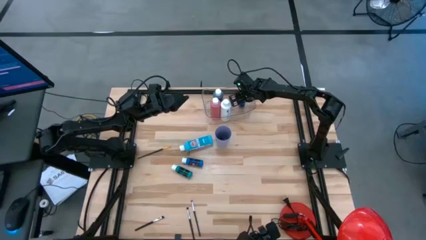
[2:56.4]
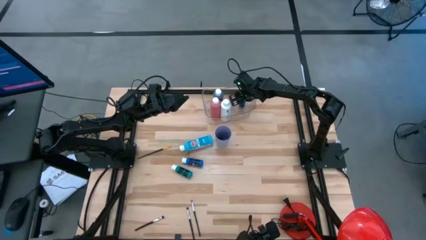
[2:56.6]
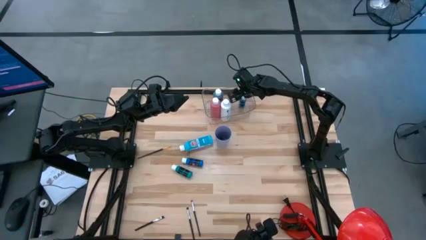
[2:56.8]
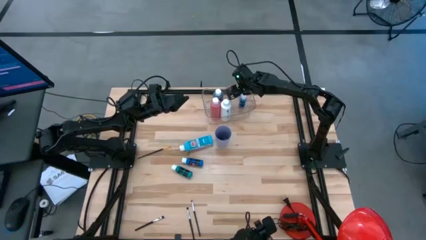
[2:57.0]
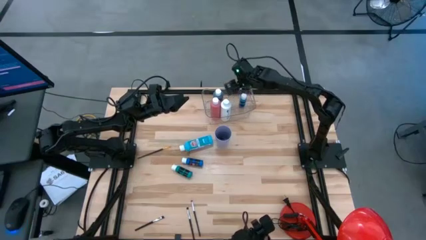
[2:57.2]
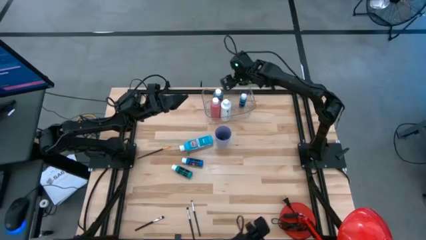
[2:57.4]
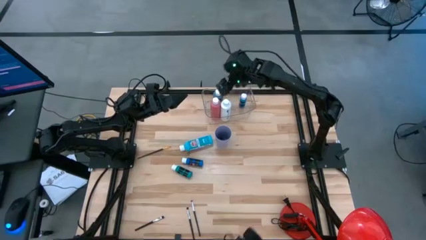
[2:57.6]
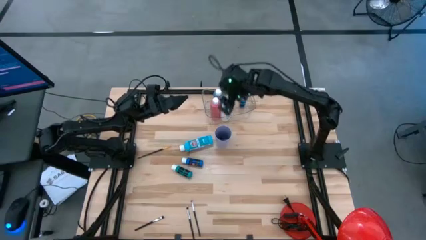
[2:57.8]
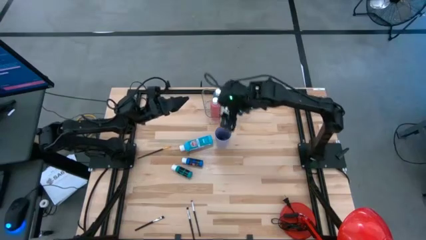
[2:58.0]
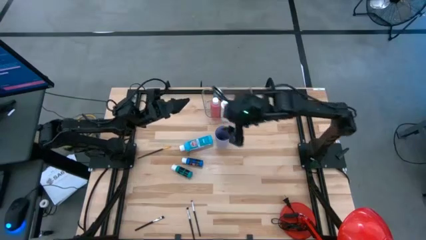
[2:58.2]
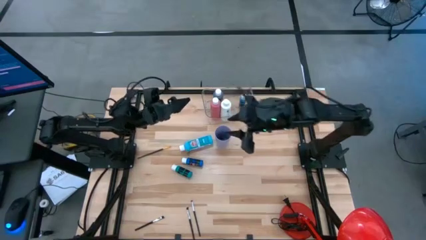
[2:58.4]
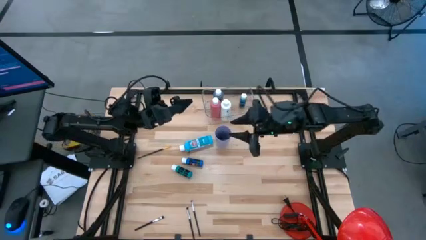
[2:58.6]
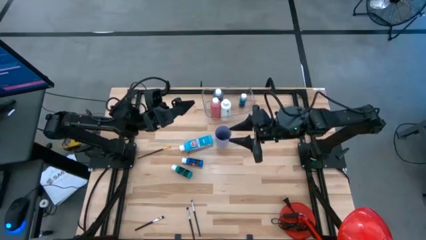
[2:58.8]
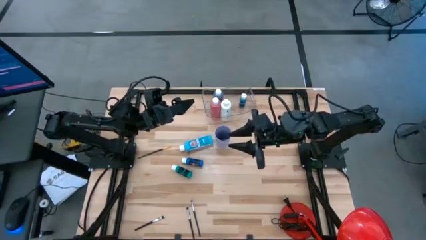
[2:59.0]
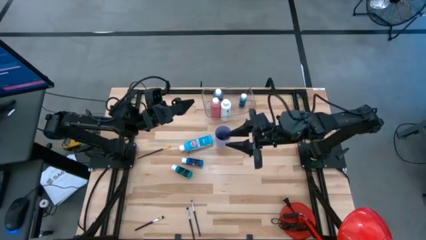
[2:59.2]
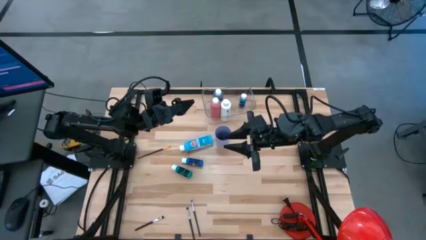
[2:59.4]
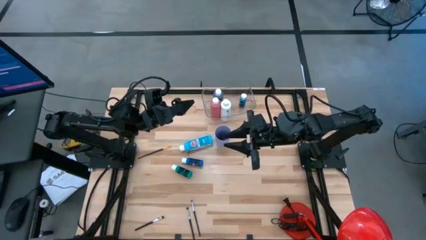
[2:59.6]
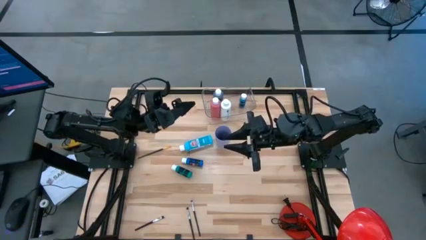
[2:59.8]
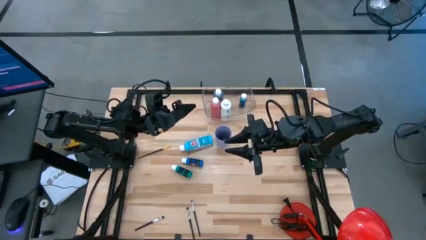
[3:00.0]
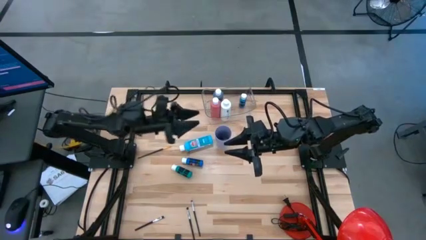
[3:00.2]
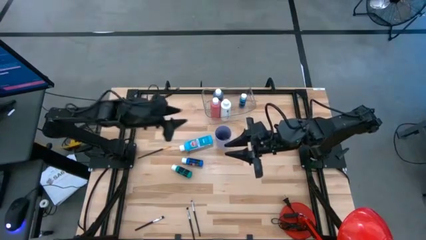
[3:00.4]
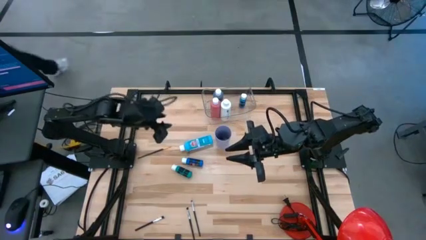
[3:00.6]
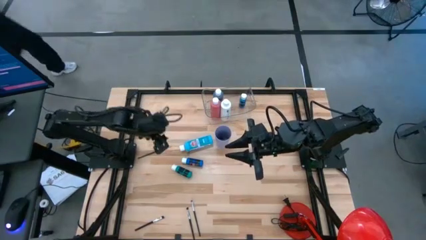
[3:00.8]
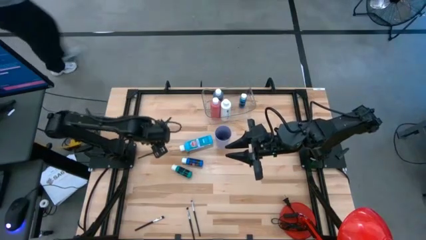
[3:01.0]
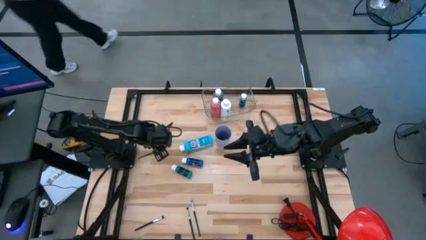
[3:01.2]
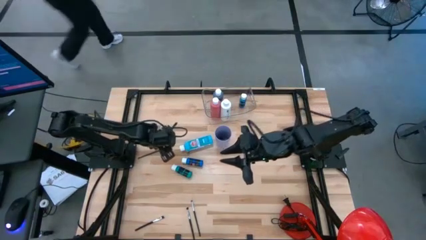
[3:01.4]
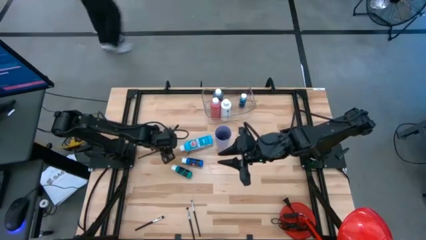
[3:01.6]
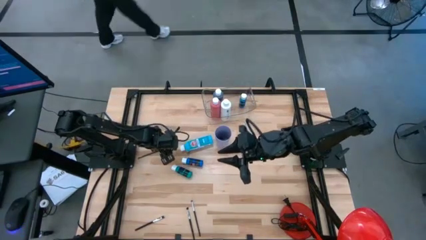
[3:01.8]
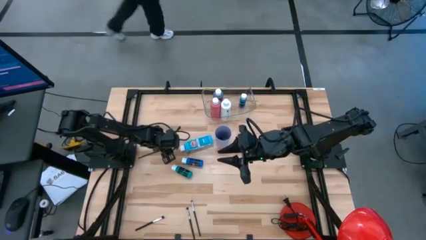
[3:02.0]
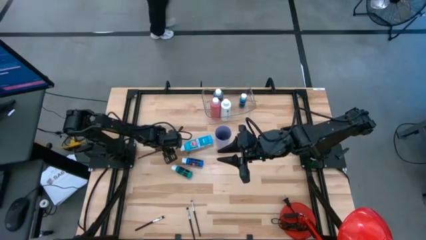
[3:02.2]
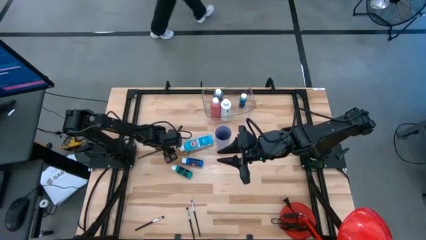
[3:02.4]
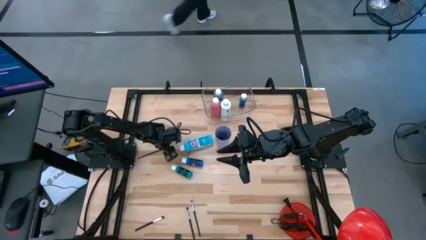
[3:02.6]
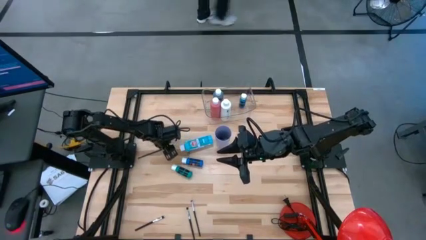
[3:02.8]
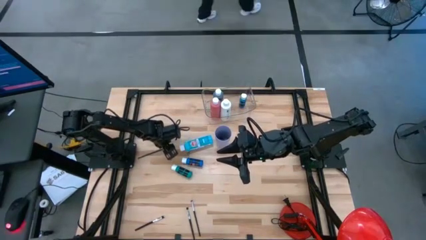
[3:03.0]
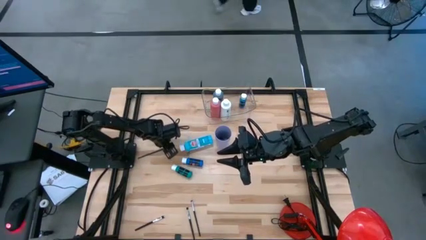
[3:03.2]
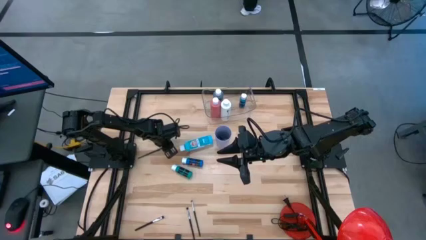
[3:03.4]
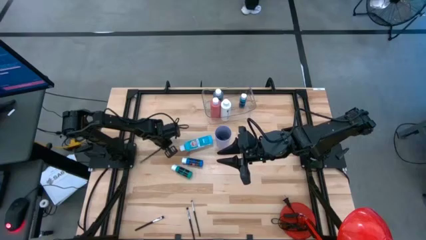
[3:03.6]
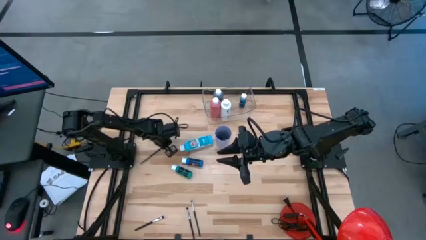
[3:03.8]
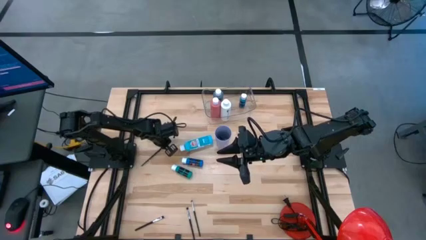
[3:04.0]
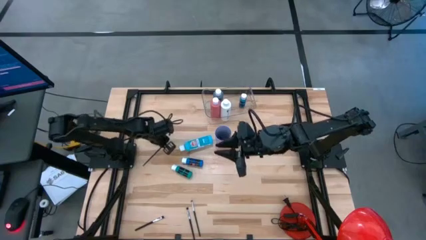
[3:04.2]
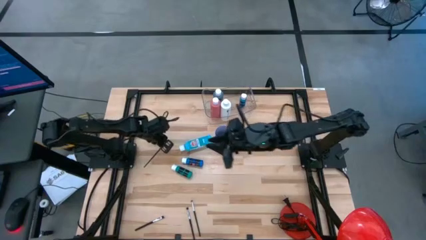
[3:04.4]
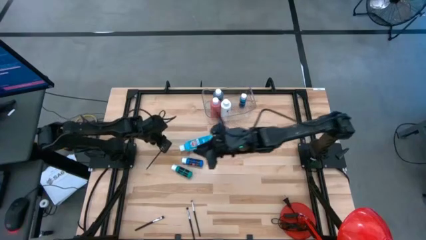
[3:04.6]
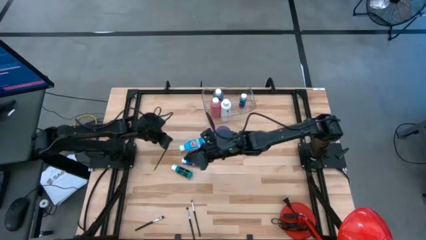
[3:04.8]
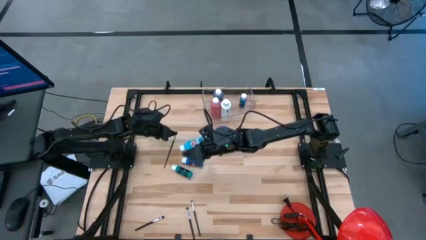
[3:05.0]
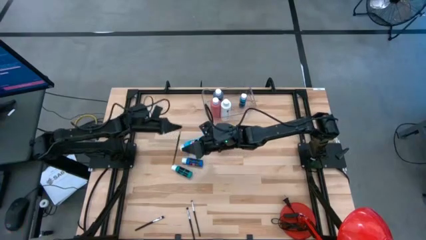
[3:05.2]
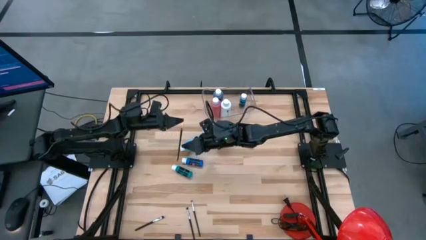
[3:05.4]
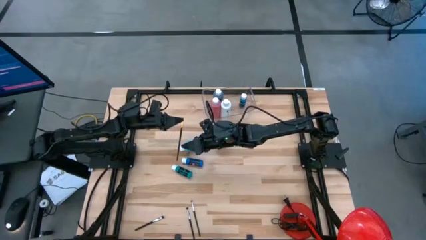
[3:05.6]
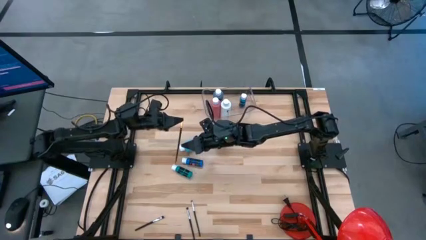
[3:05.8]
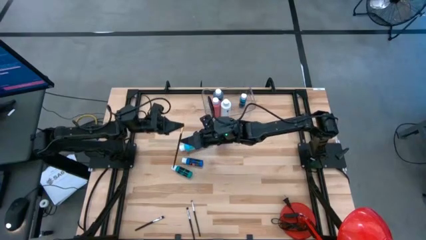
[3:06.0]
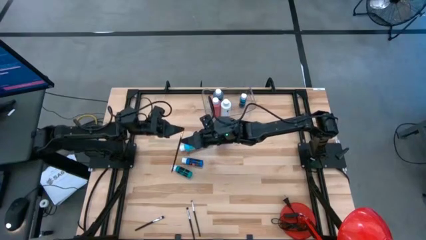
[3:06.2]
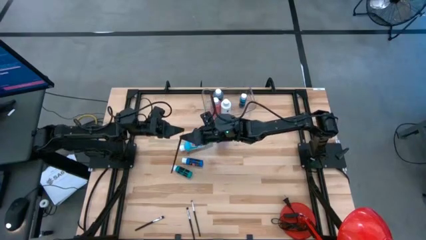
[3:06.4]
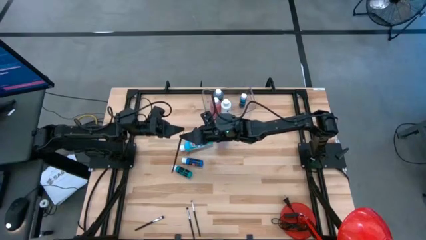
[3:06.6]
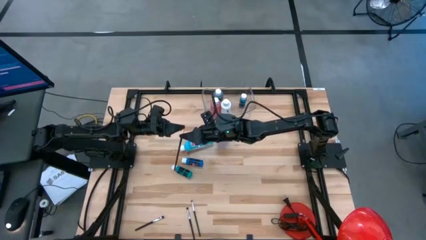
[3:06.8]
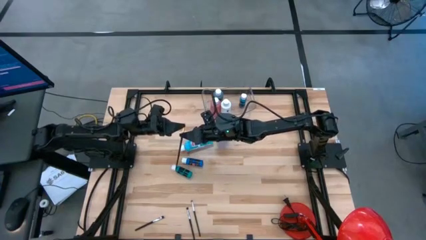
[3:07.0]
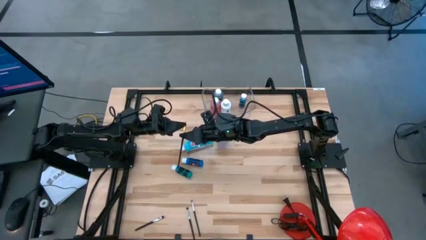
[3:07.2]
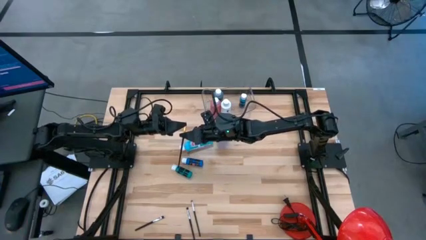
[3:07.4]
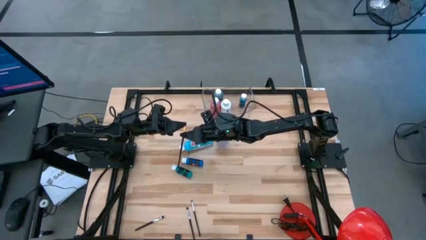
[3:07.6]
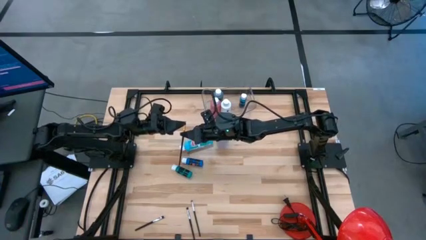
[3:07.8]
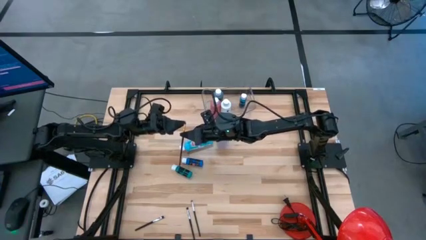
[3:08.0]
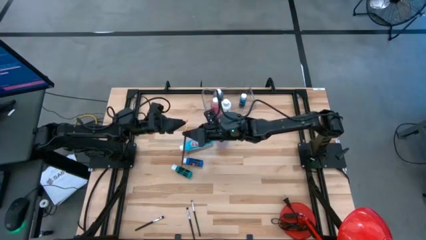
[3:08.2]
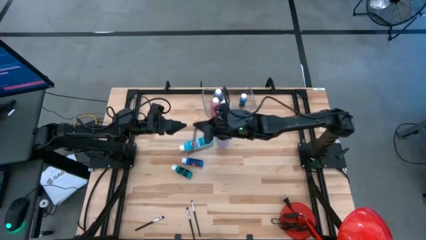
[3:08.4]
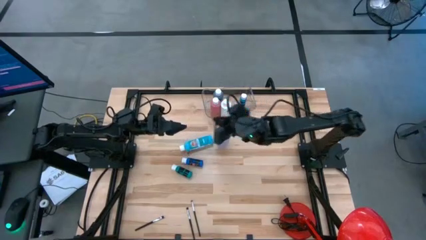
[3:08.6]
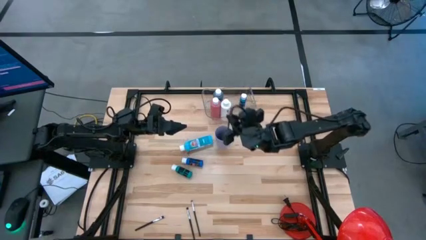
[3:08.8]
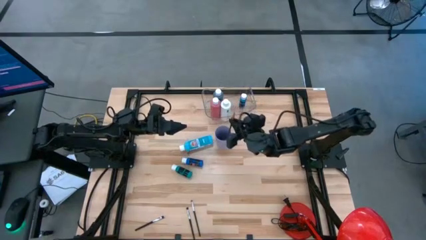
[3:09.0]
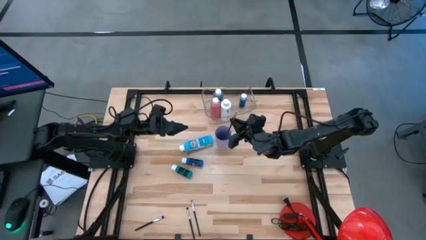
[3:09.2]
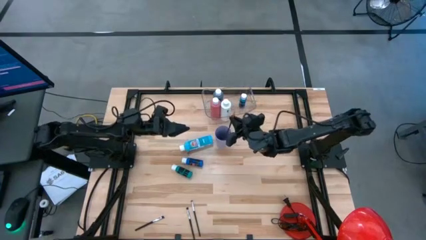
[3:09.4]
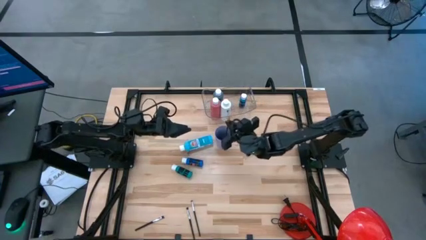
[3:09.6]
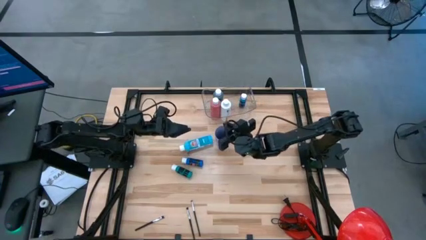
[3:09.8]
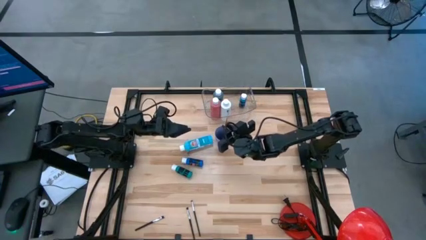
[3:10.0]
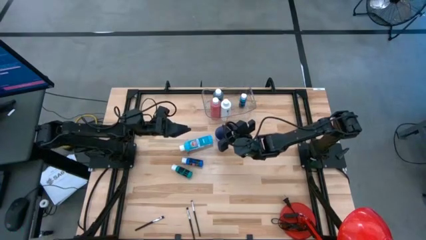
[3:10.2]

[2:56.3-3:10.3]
Task: Pick & Place Paint Supplies
Put the black paint brush into the violet cup

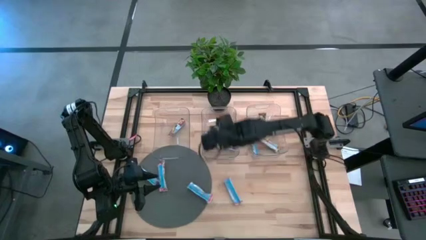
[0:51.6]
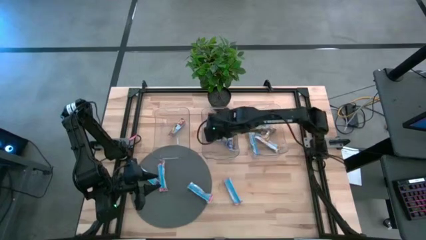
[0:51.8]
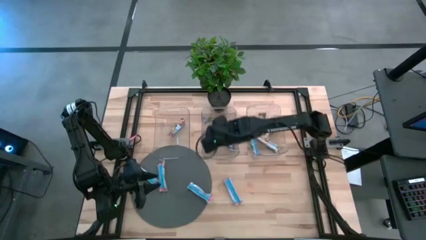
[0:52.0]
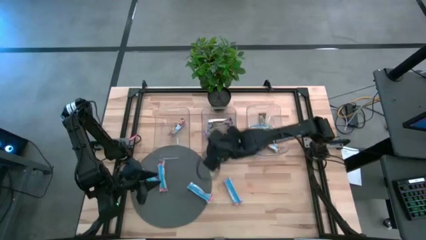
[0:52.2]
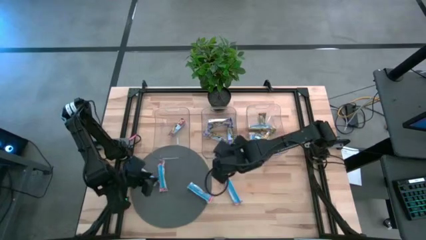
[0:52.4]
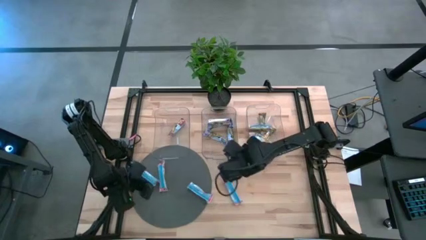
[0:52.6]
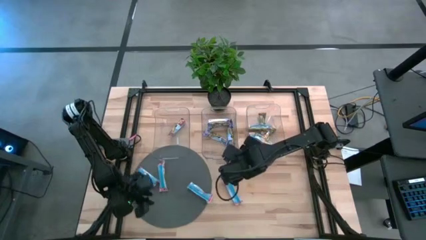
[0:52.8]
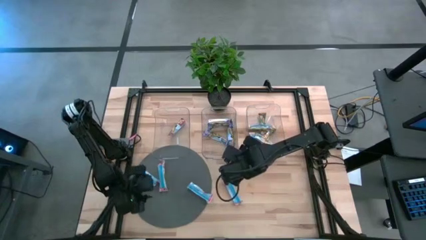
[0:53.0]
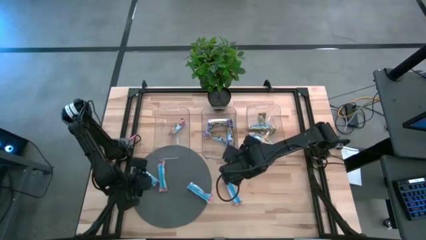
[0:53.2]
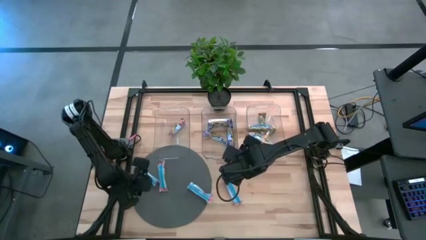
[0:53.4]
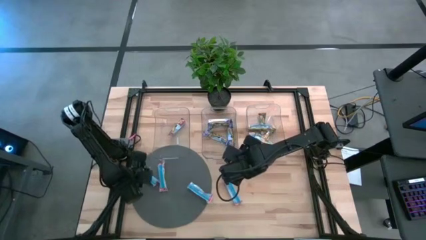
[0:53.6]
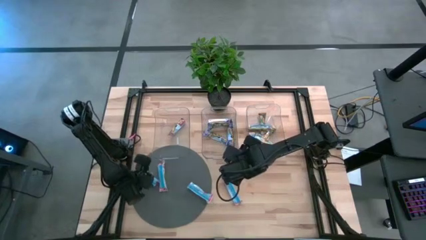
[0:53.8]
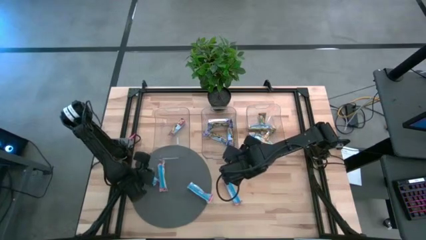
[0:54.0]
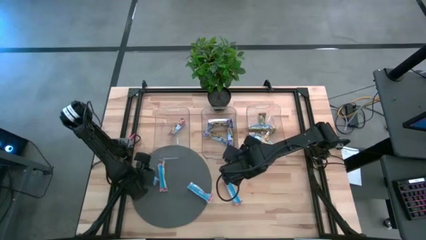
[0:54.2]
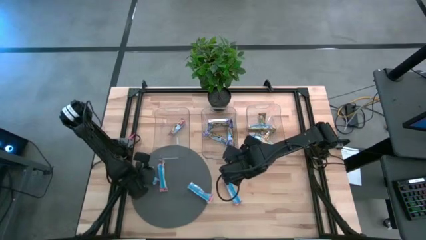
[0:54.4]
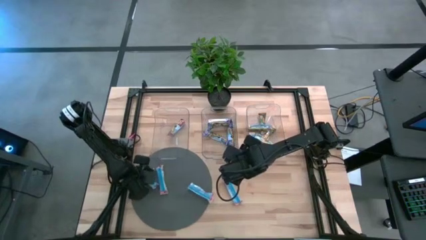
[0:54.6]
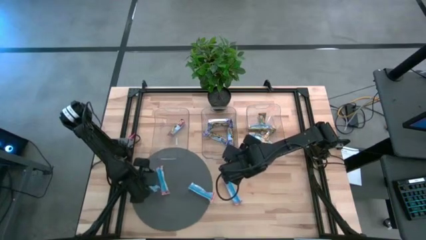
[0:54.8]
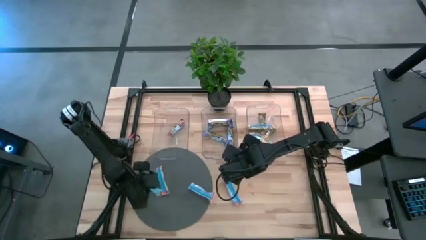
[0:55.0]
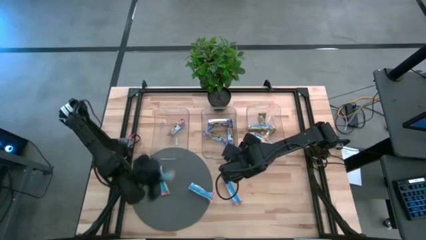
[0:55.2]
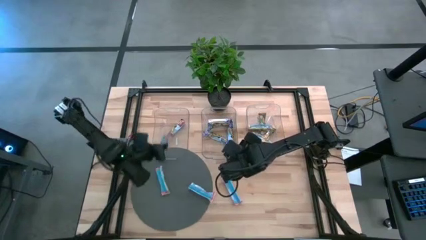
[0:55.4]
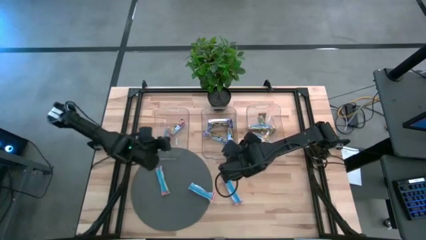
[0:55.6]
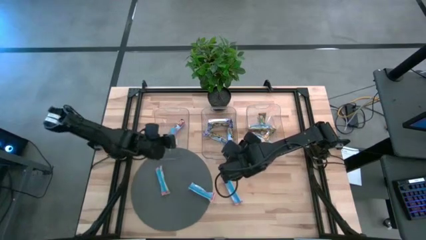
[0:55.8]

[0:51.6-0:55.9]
Task: Pick and place Granola Bars by type
Put the red granola bar into the left transparent bin
